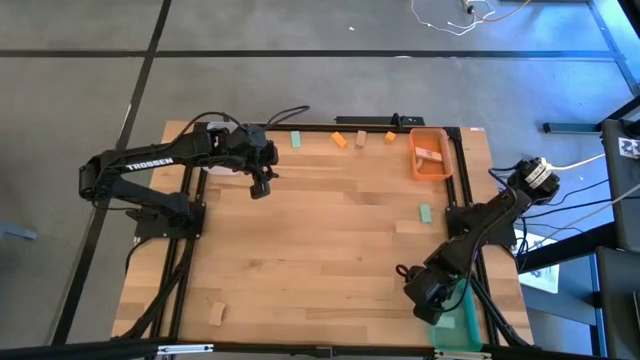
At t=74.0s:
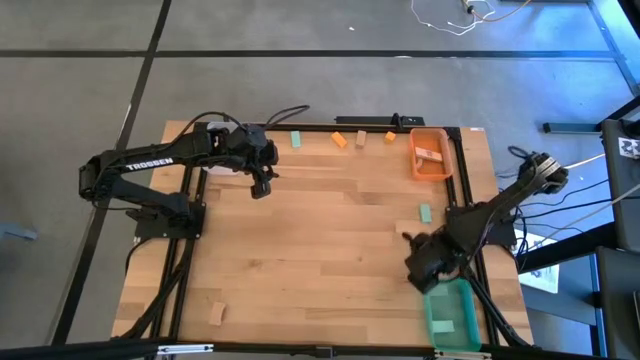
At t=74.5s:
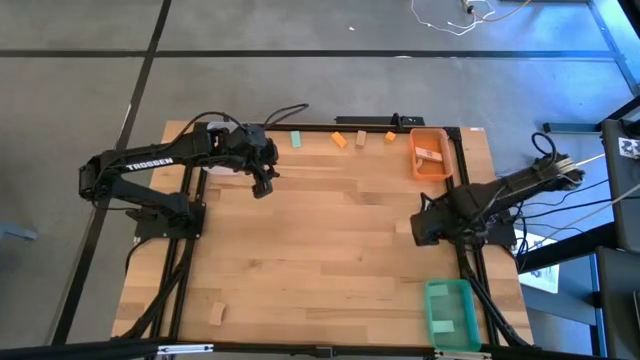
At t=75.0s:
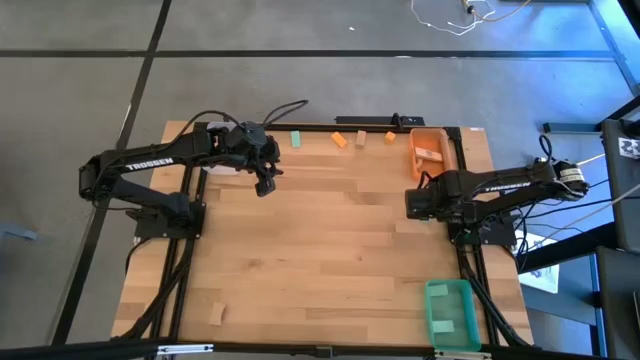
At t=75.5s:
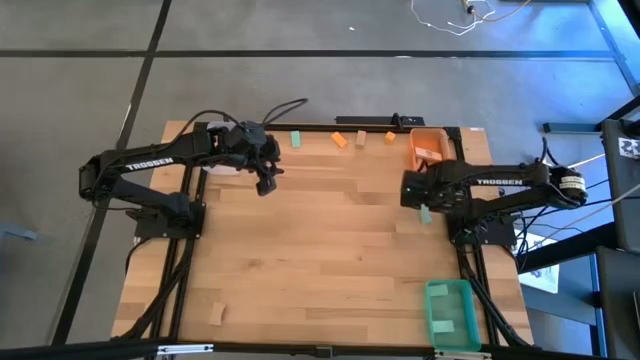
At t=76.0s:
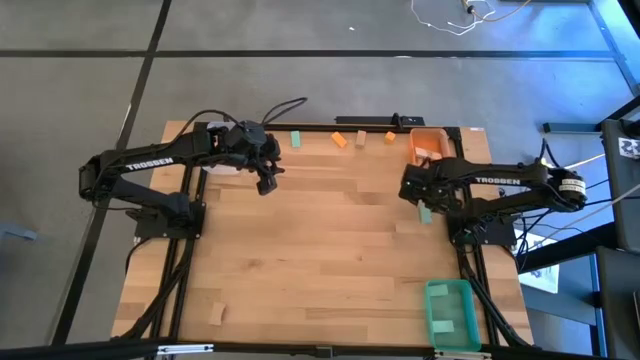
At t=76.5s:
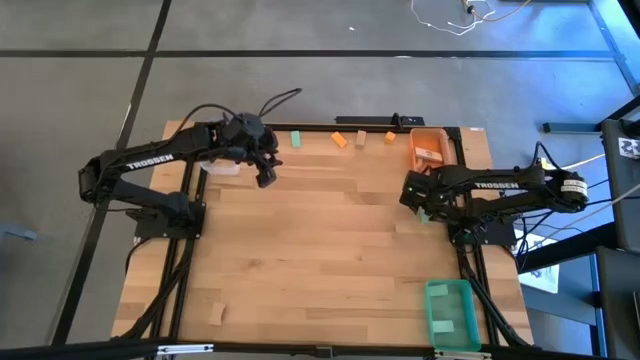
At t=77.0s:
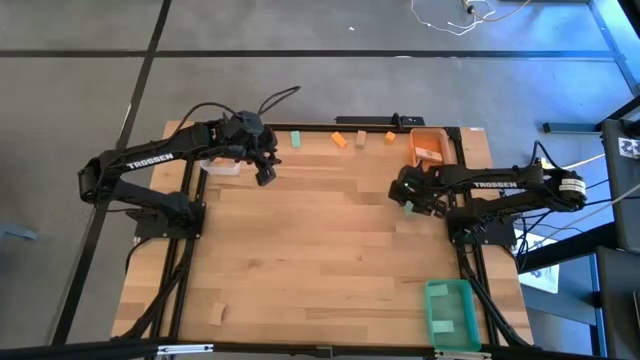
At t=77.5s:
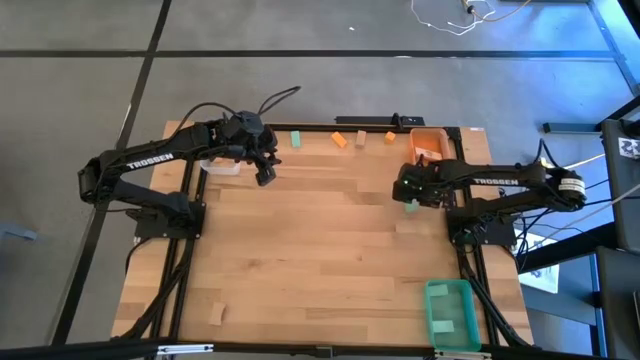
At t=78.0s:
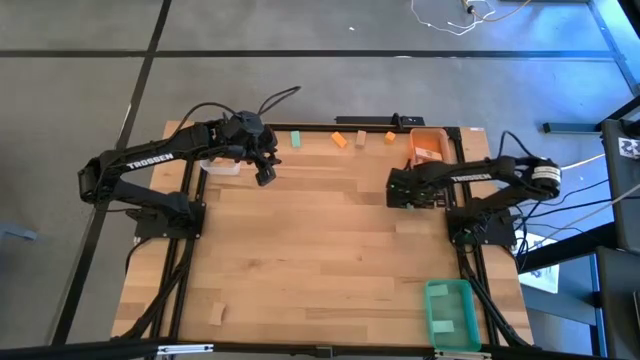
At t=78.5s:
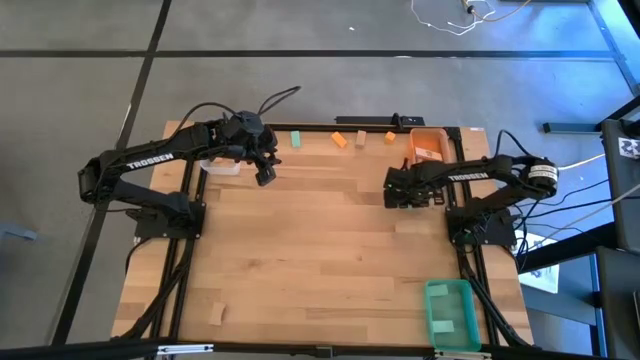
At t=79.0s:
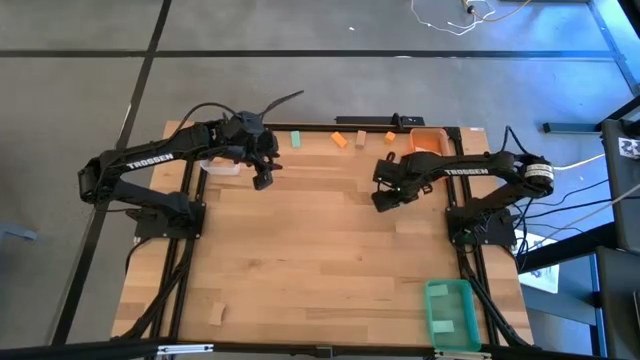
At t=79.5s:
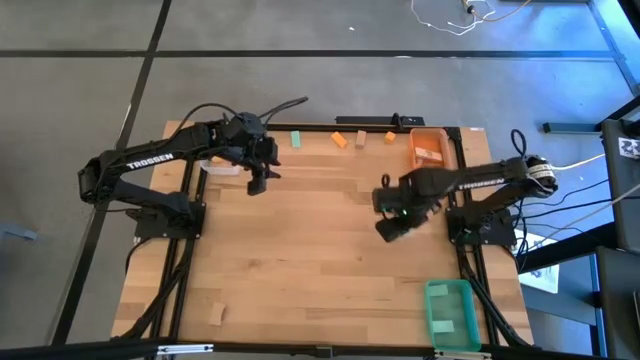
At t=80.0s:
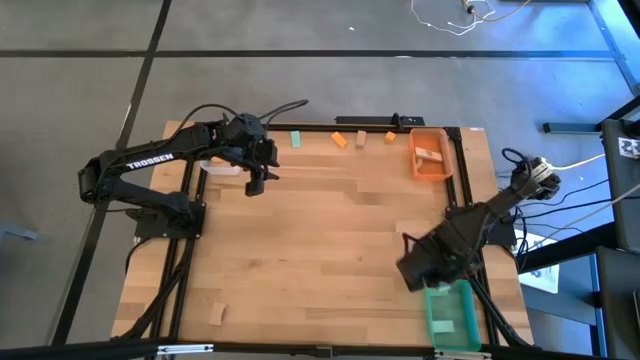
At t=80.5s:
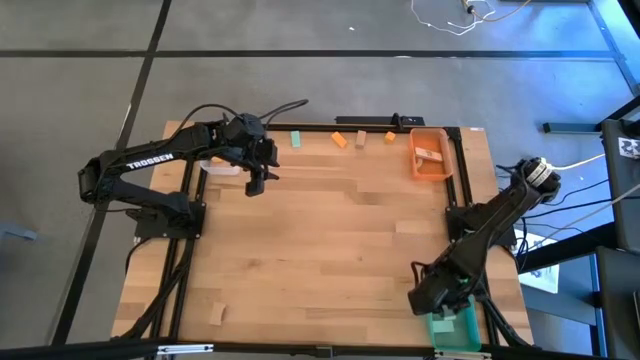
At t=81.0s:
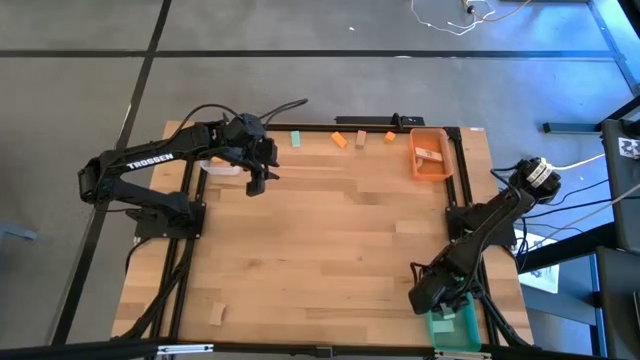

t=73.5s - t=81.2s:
Task: Sort & place blocks by color
Put the blue block into the green bin

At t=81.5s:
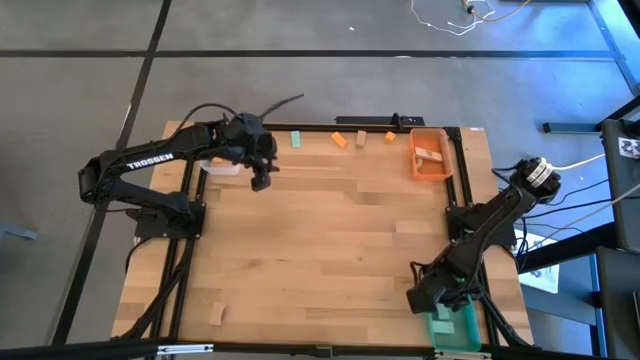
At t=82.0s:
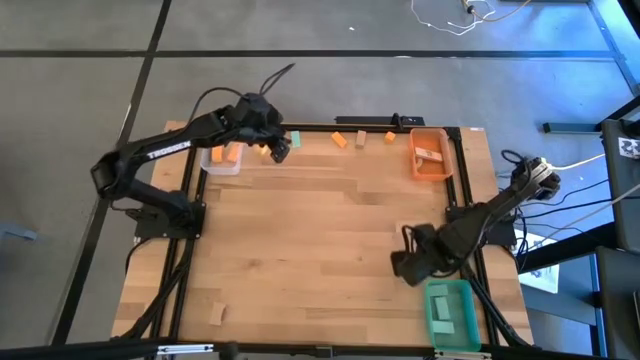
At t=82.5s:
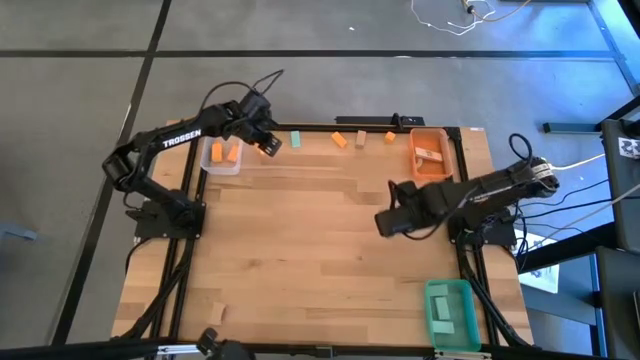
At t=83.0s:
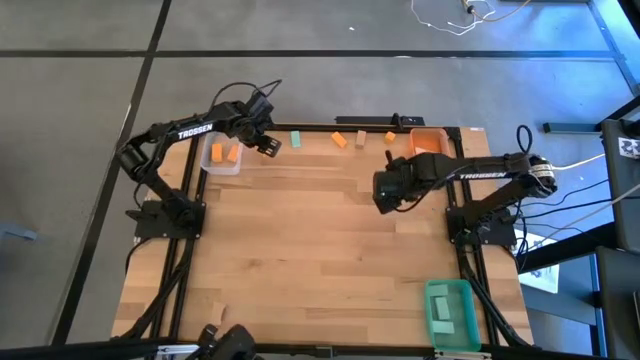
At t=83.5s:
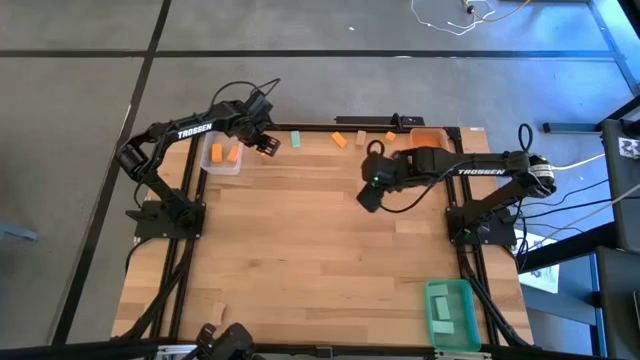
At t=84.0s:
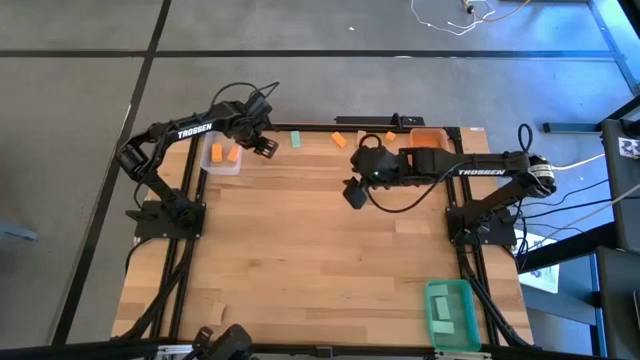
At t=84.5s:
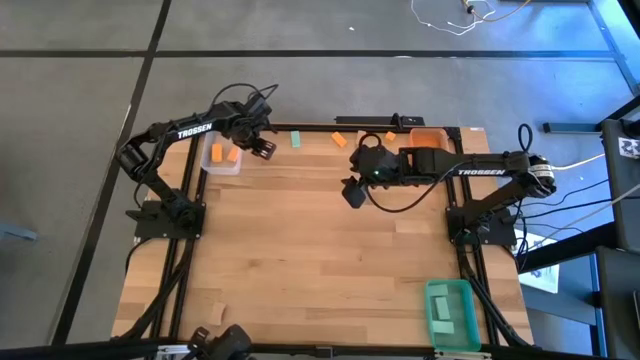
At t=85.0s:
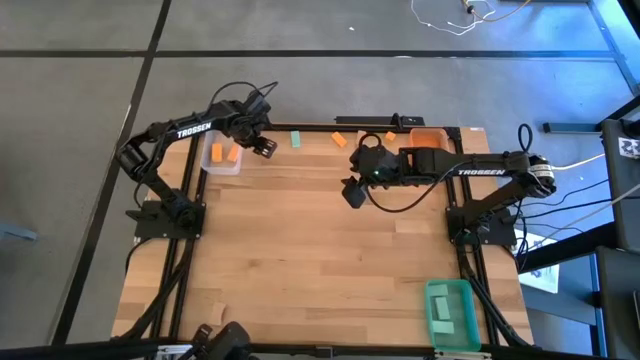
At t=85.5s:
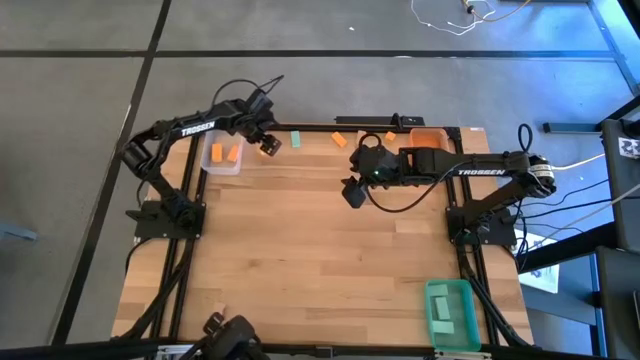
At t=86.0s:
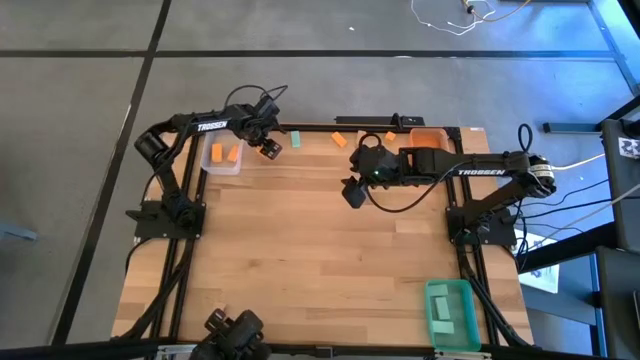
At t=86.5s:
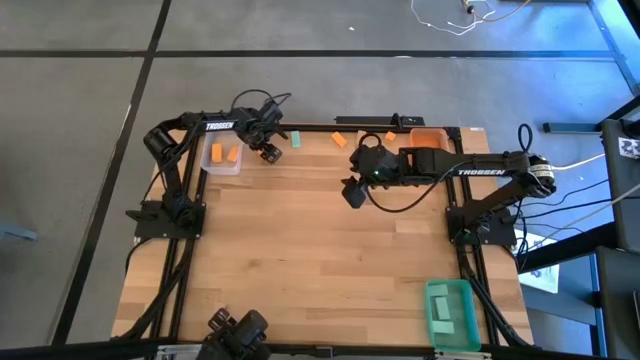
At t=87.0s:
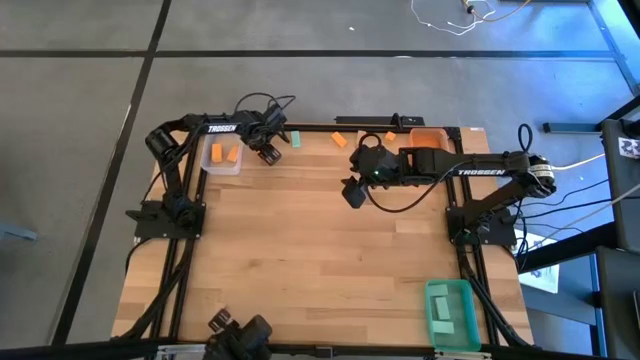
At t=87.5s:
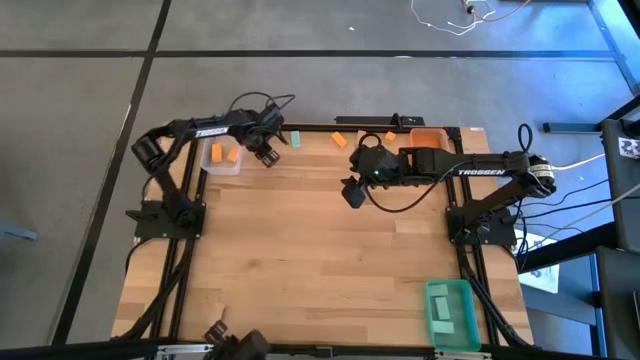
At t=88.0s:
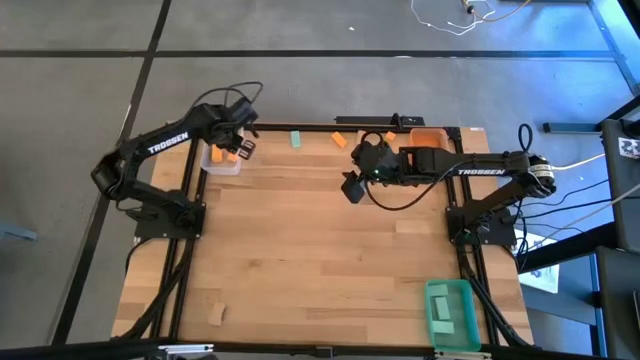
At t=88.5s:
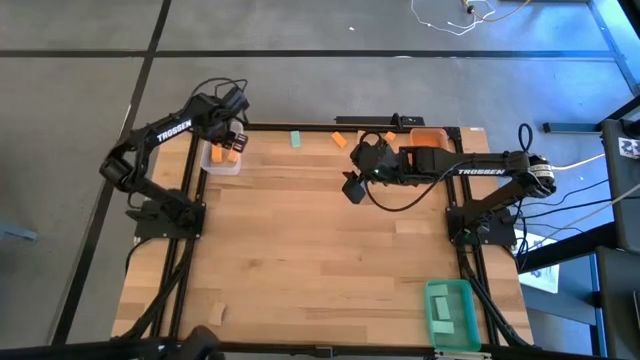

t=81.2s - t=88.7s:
Put the orange block into the transparent bin

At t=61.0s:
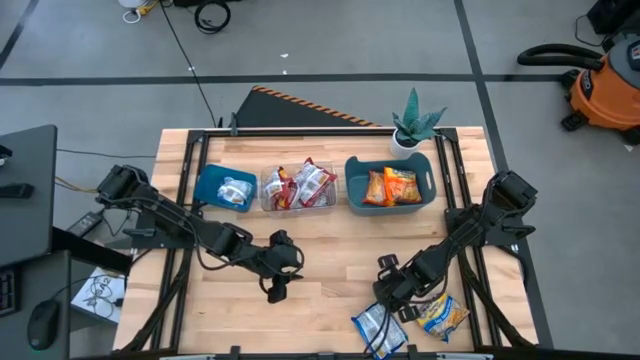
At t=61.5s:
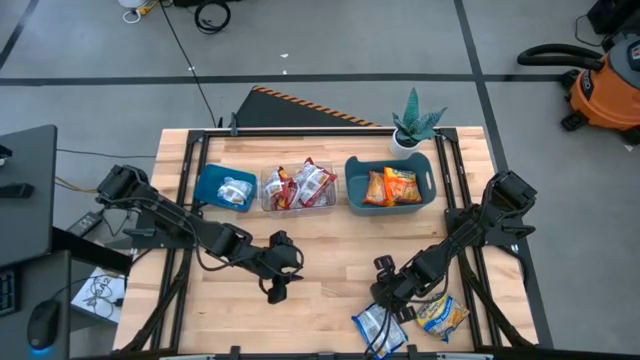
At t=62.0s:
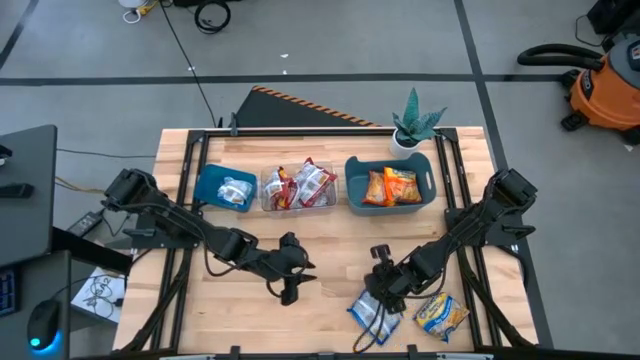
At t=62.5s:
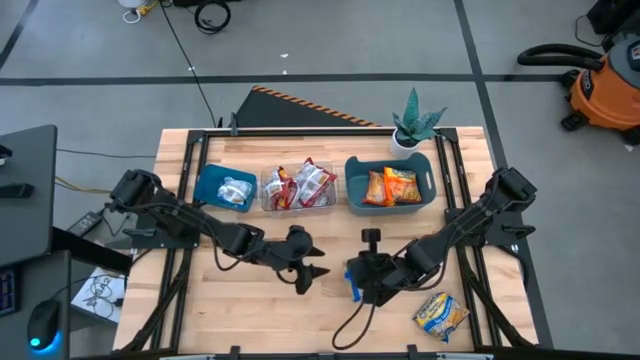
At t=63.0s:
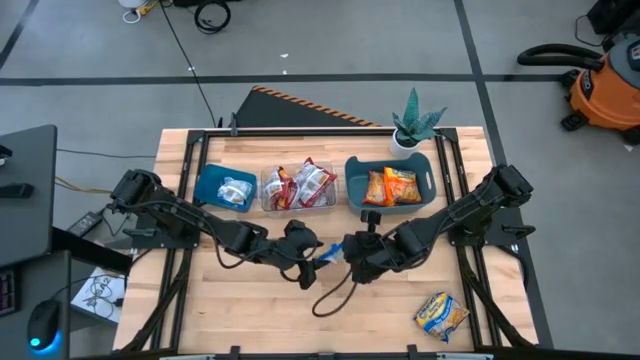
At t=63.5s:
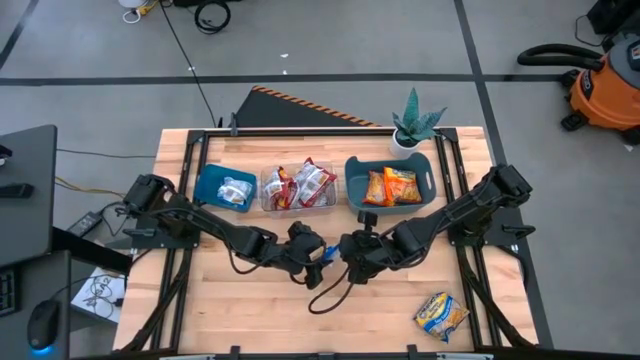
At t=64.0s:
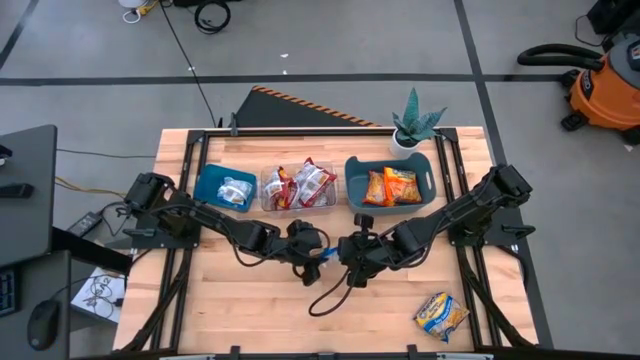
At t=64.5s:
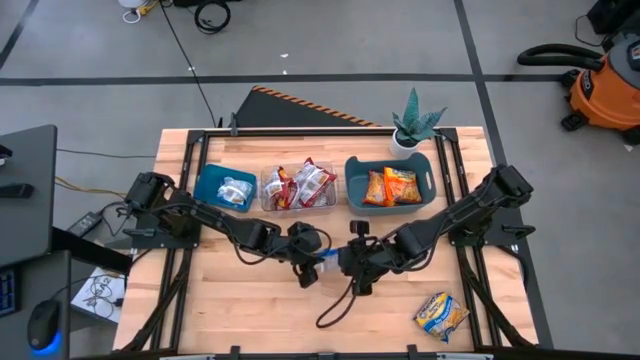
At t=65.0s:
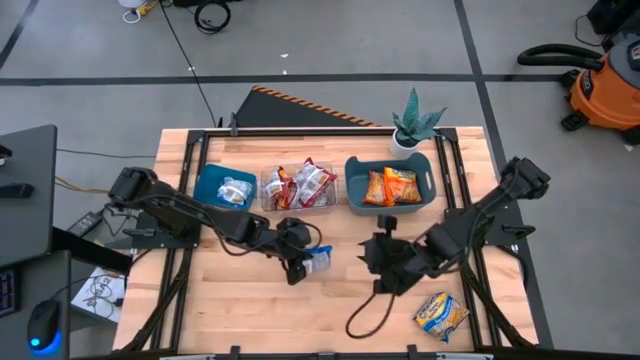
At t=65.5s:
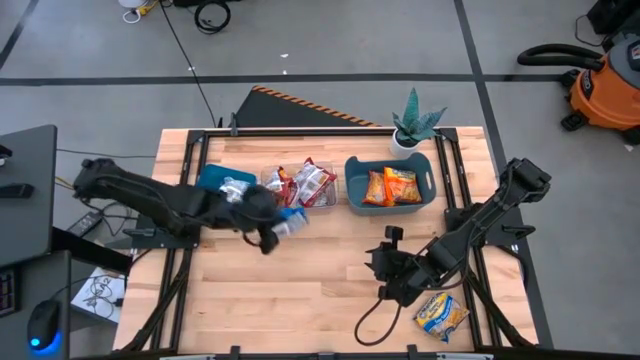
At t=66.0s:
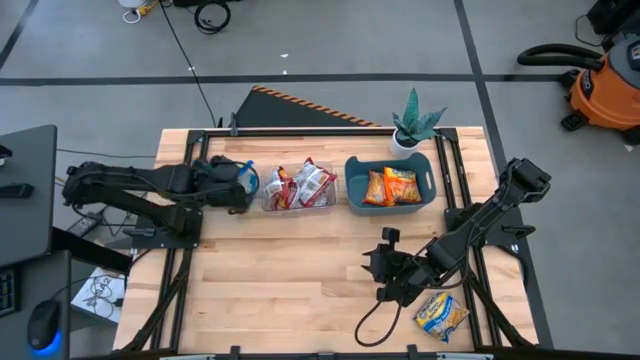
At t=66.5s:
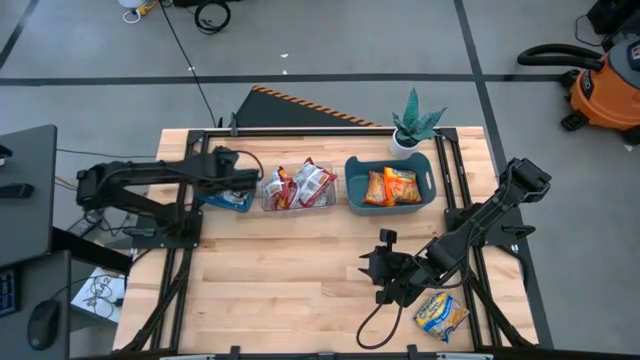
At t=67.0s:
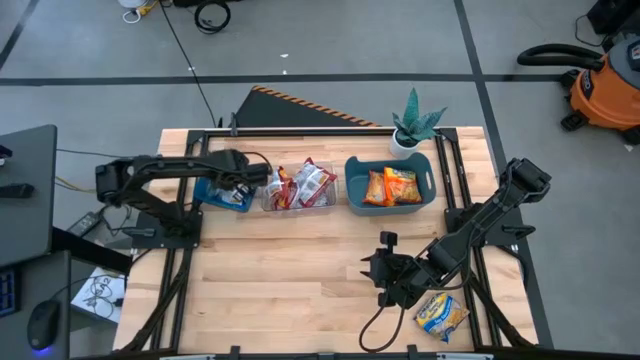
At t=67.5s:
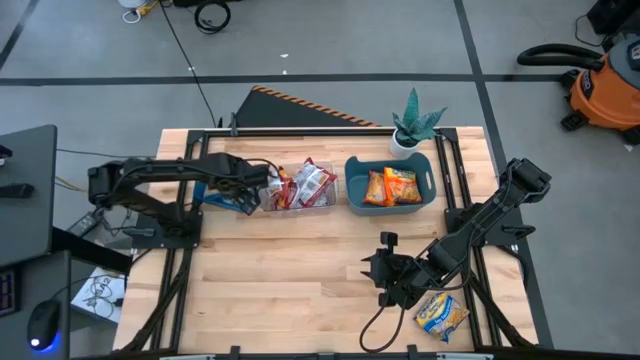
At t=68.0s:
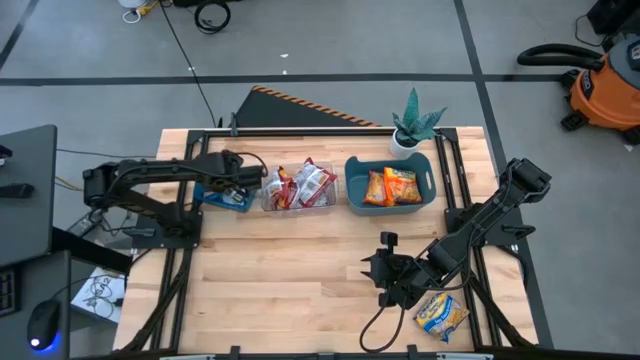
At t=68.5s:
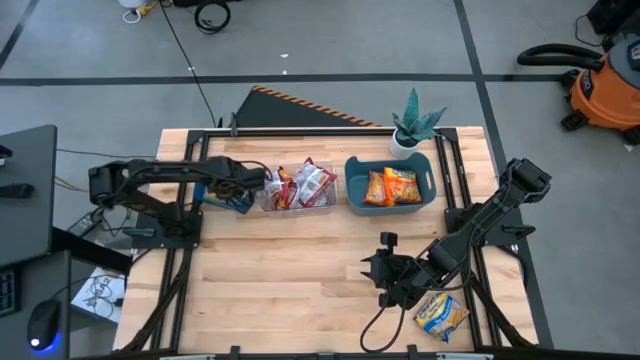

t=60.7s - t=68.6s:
Task: Sort Maruchan noodles
Put the blue noodle pack into the blue bin
